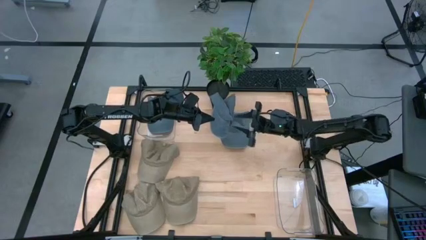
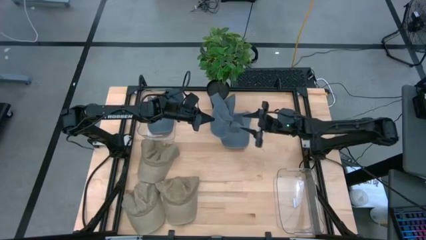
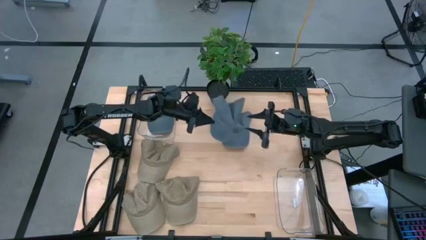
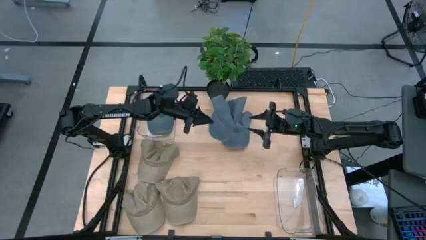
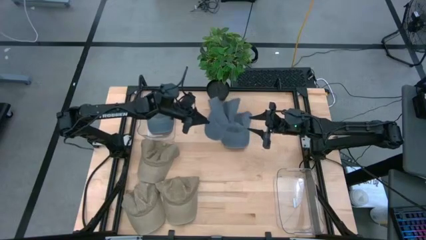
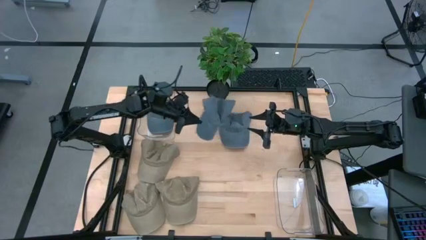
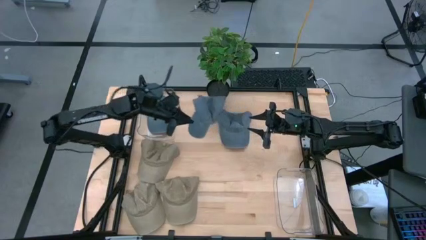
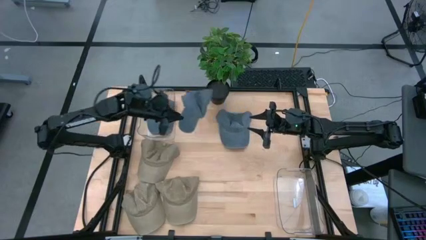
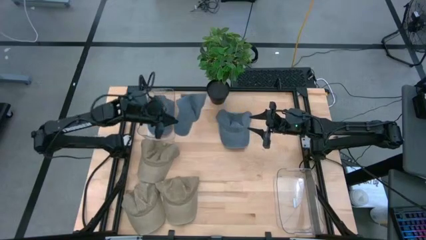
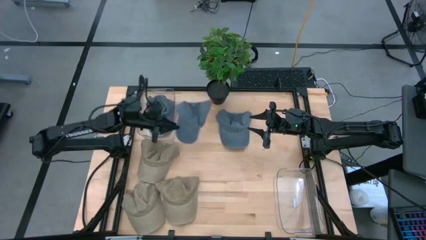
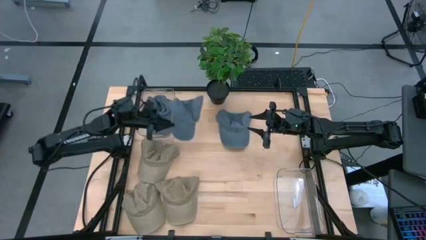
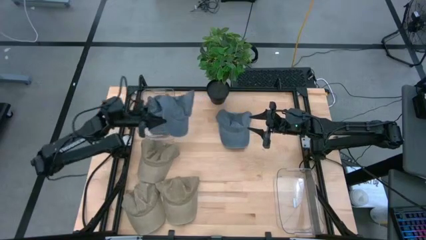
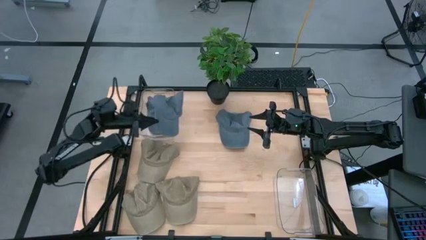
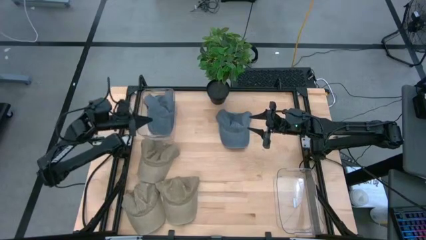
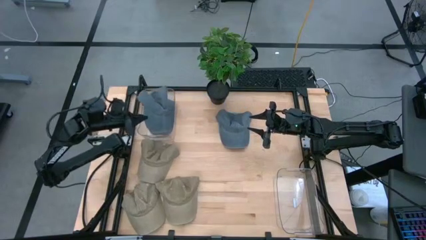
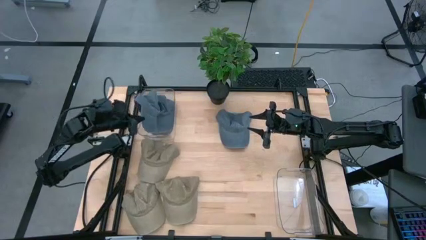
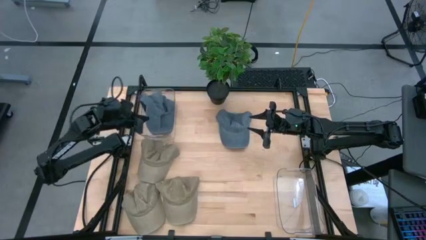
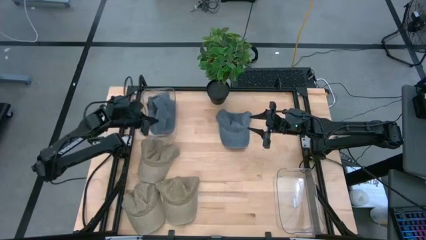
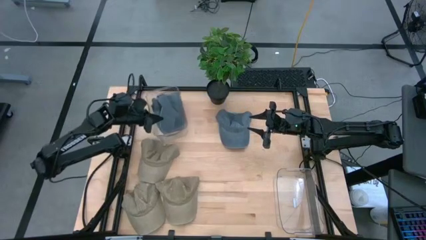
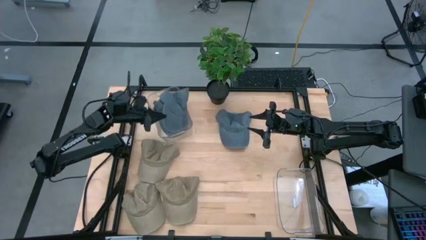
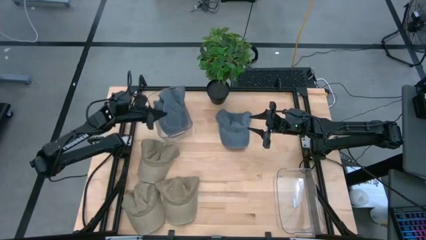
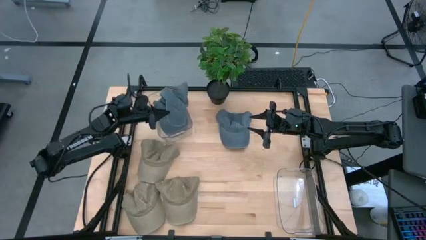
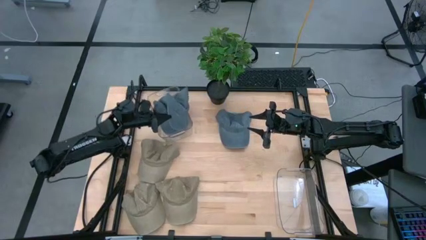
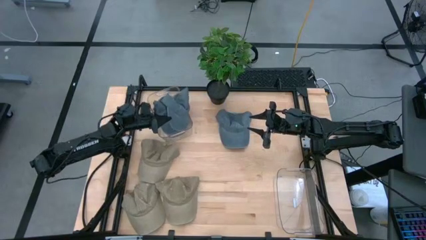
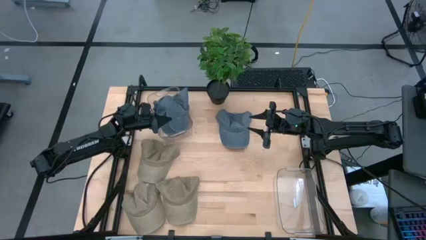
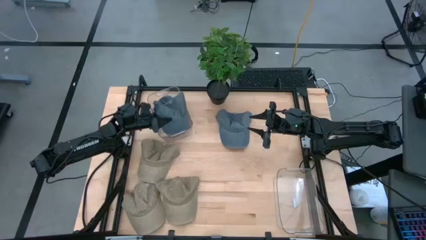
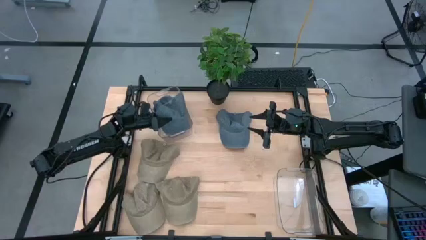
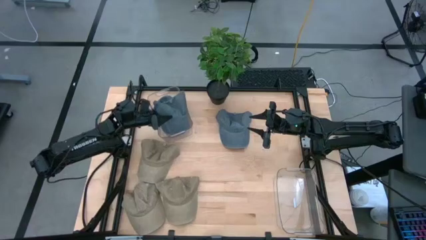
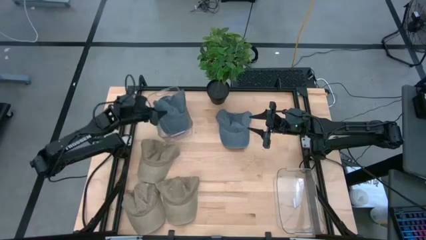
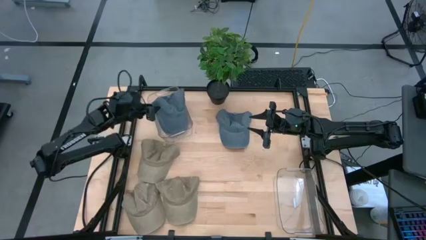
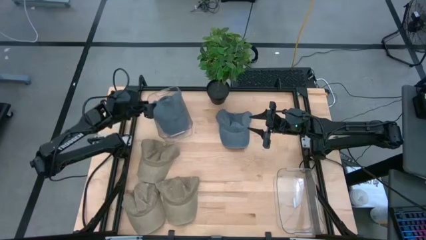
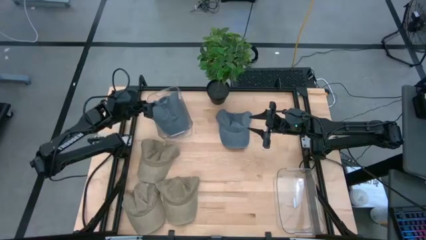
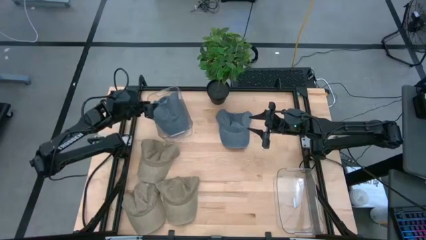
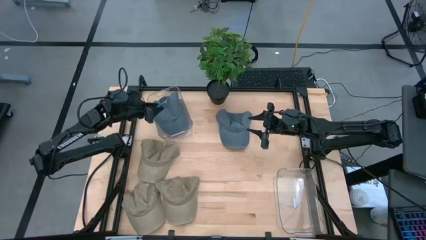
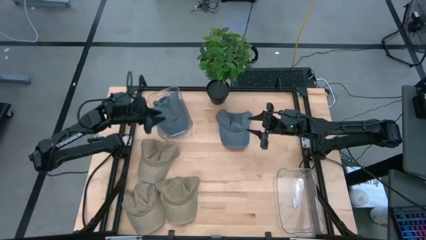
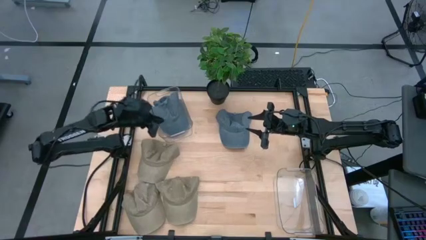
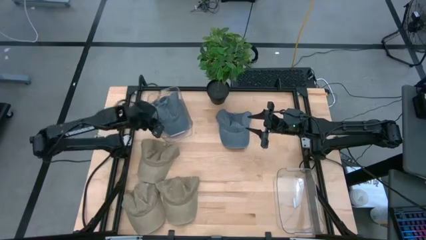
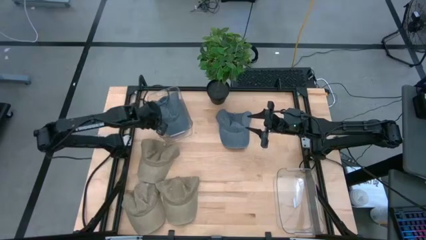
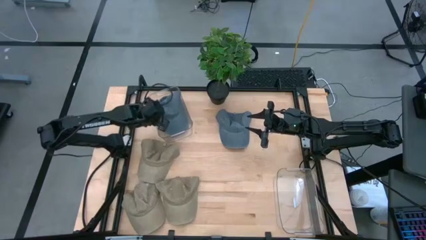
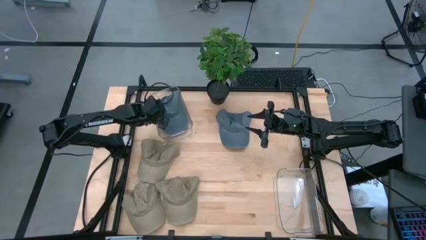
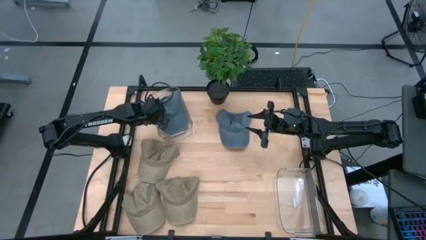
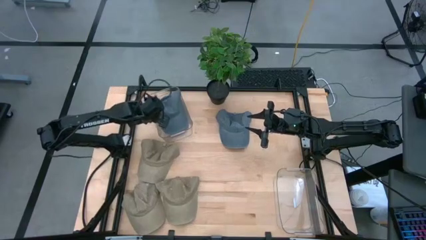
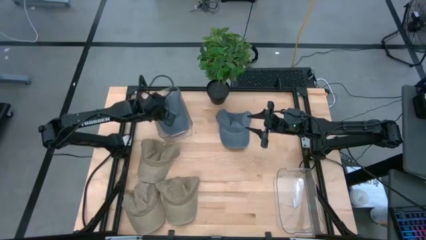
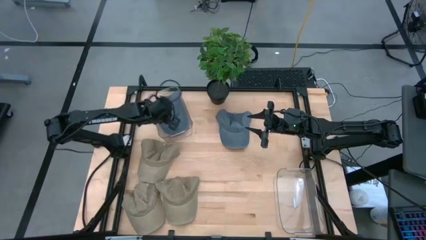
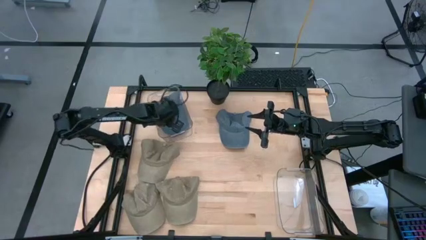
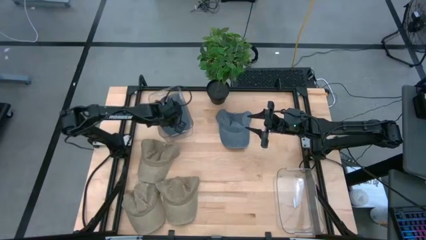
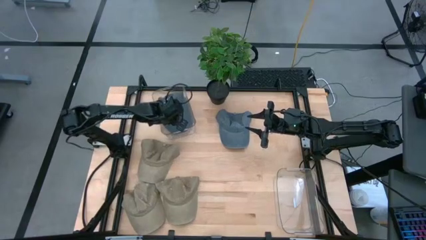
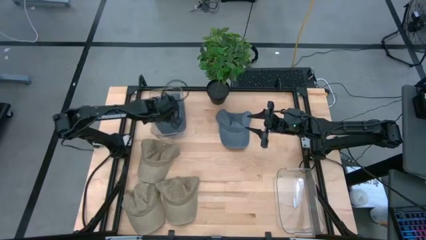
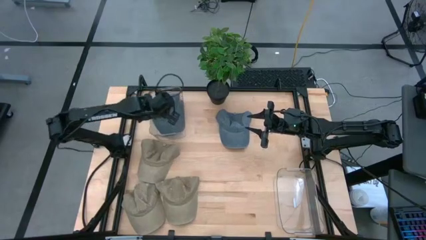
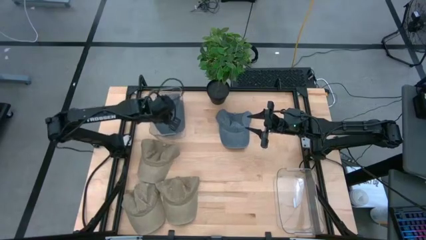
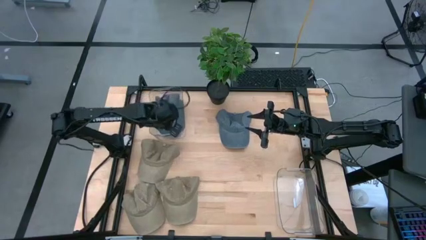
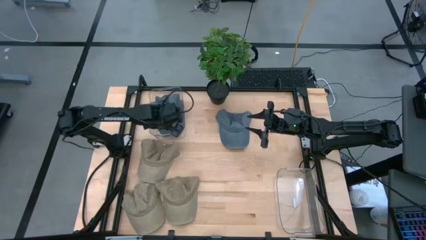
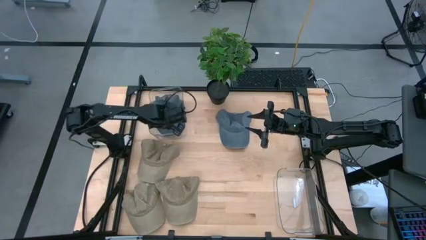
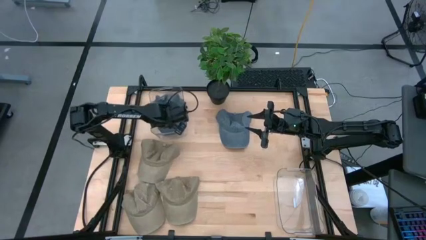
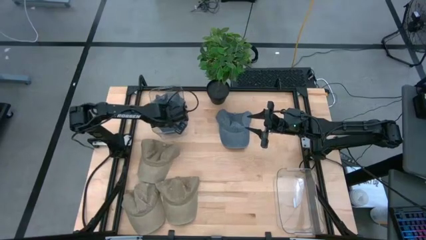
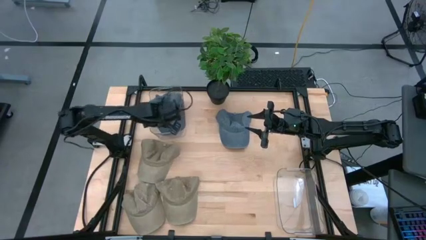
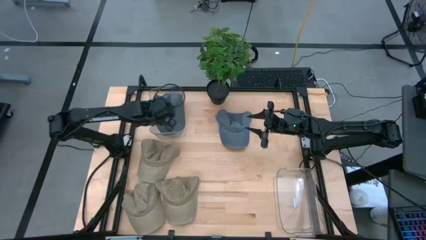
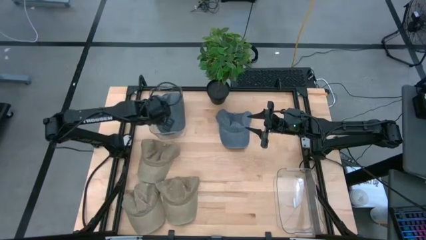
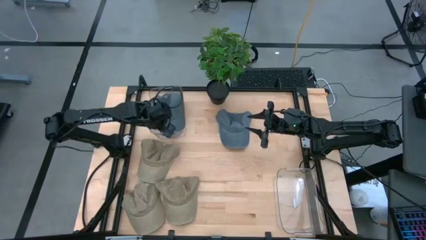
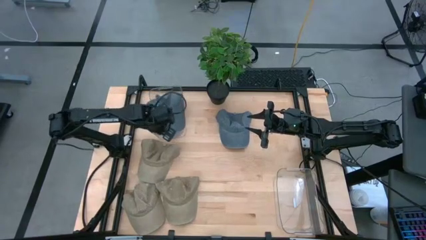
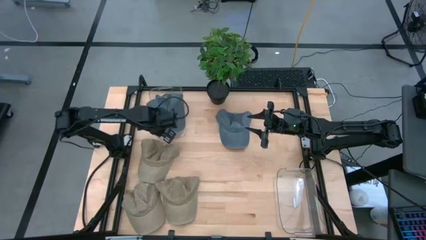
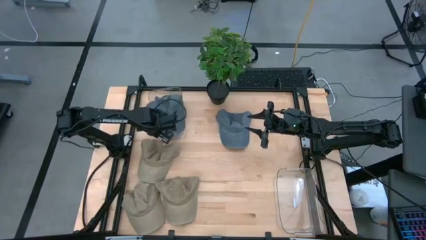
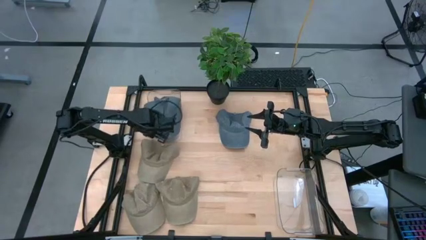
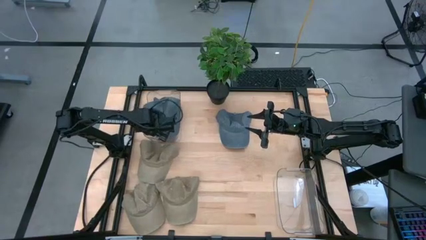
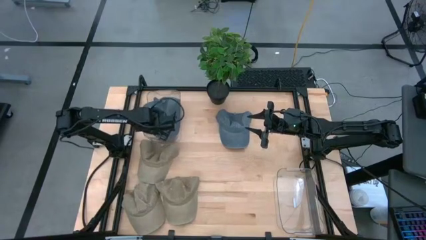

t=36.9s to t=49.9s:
Task: Pick & Place hat
Put the right blue cap into the left transparent bin

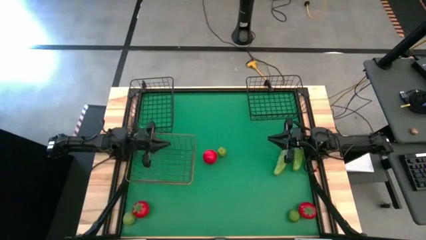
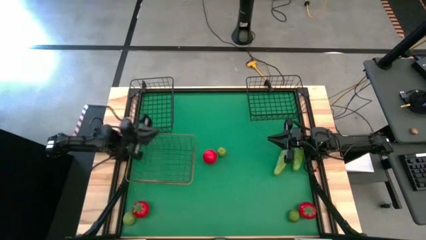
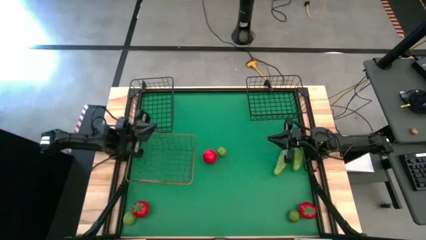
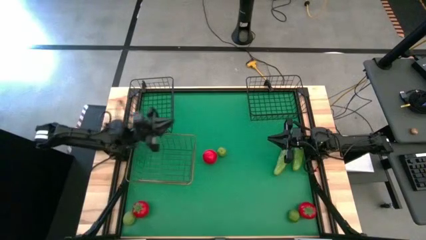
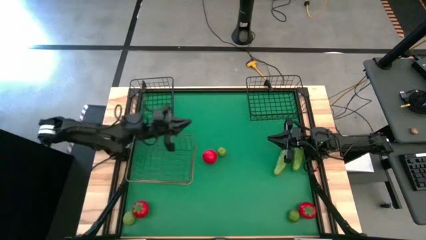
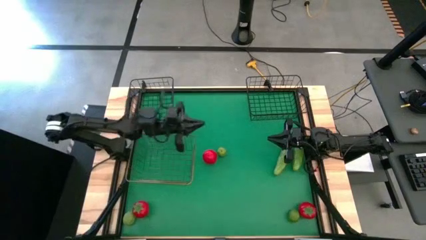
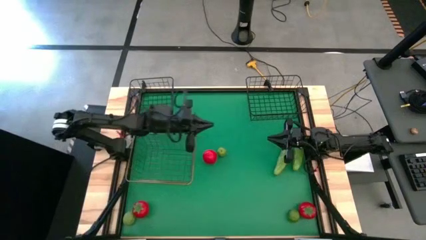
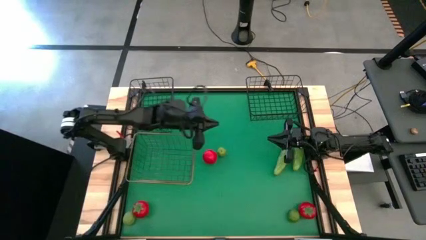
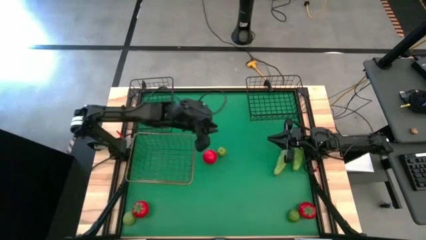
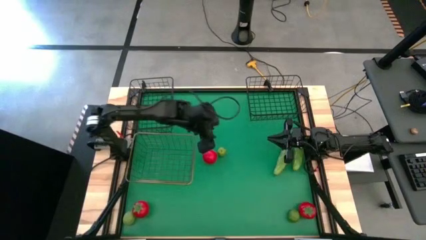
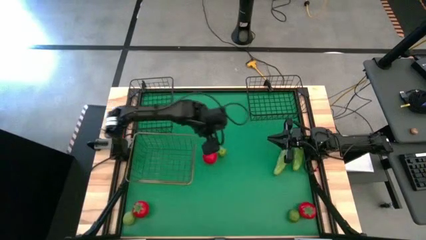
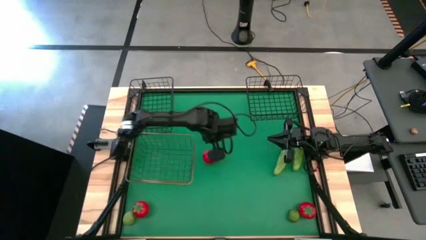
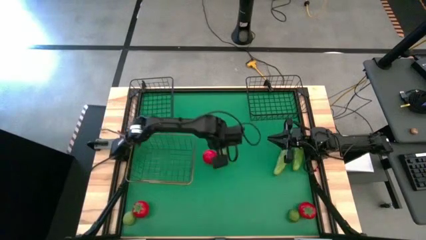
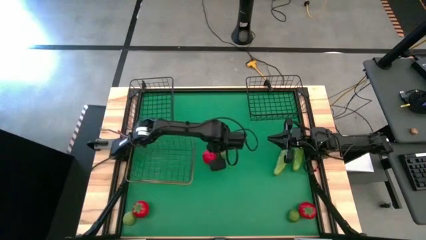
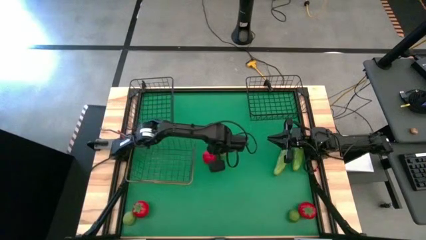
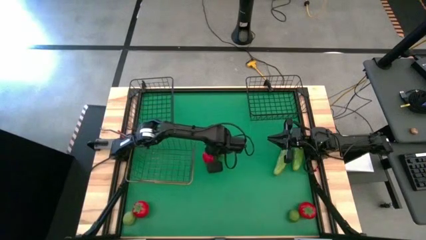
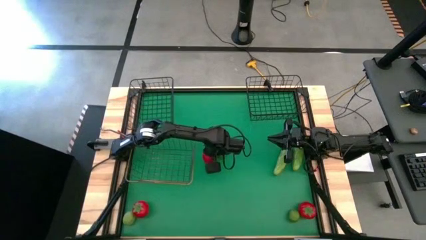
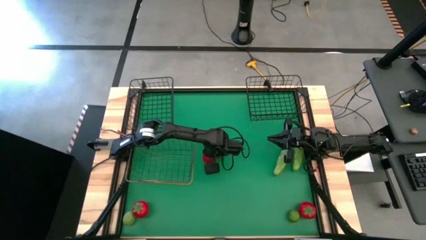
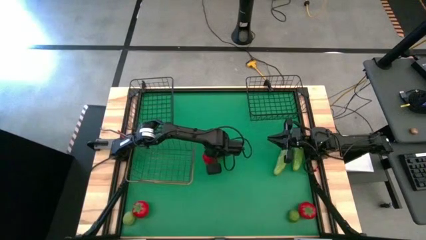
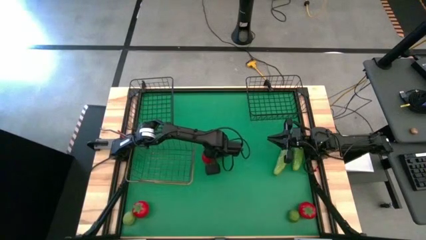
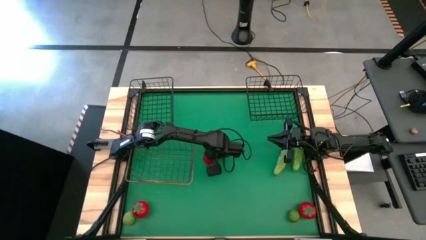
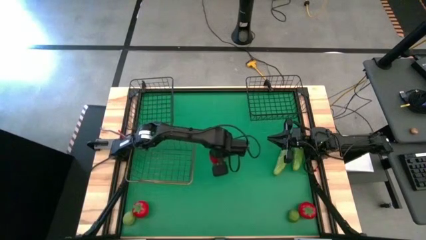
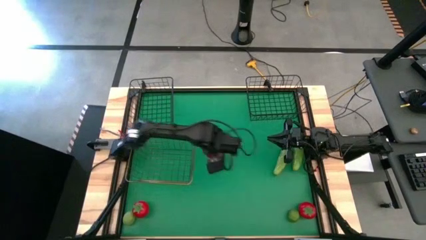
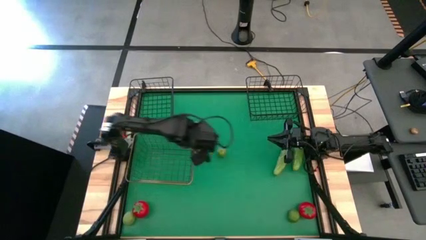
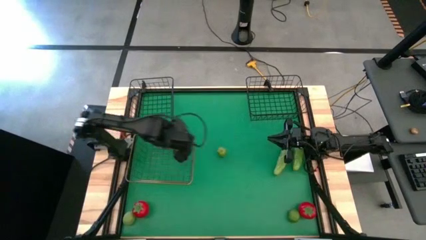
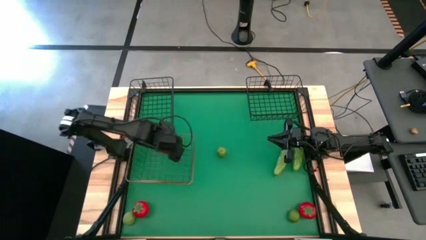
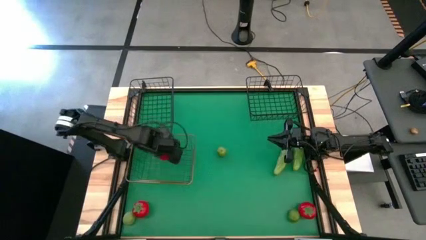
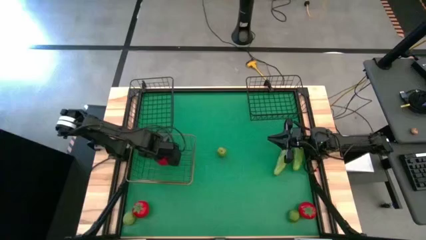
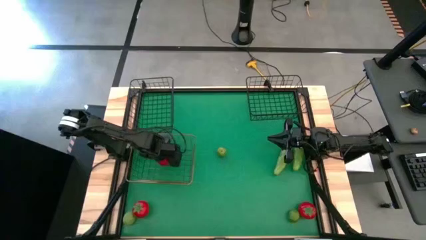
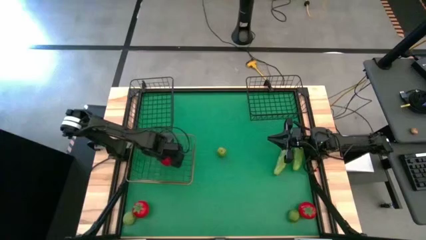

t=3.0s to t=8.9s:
Task: Sort produce into baskets
Put the top tomato into the golden wire basket
